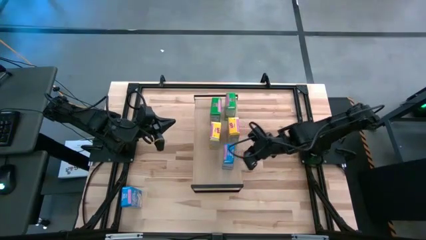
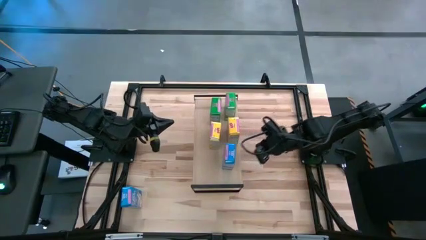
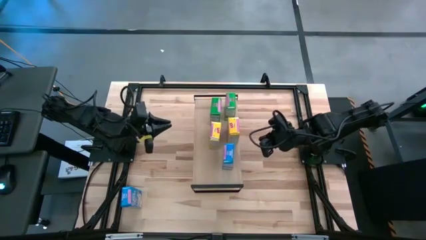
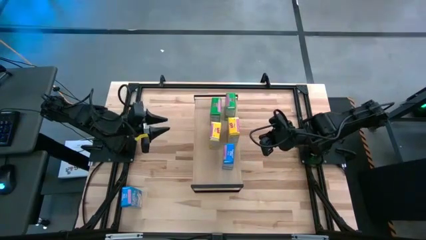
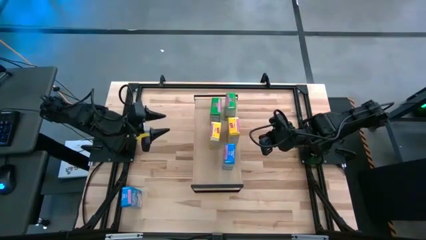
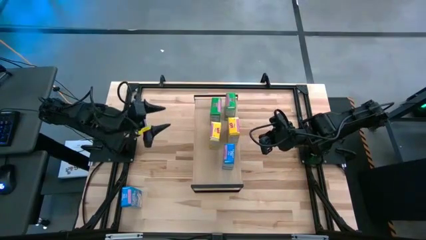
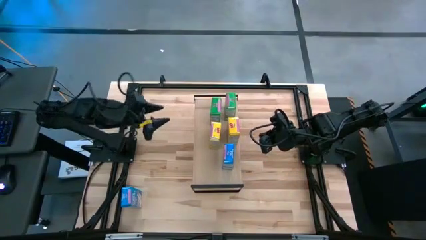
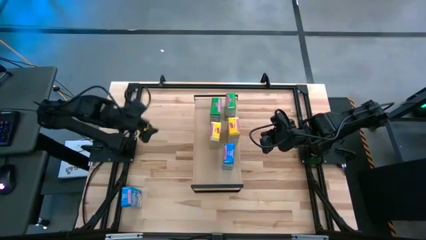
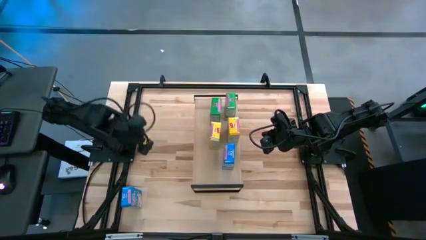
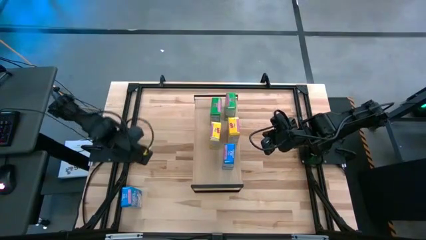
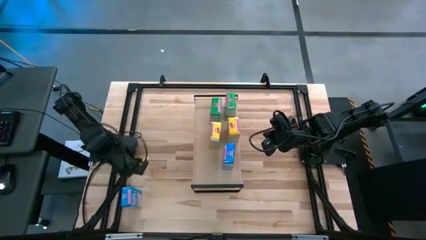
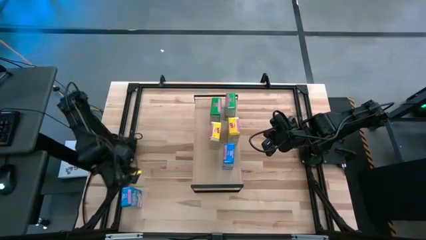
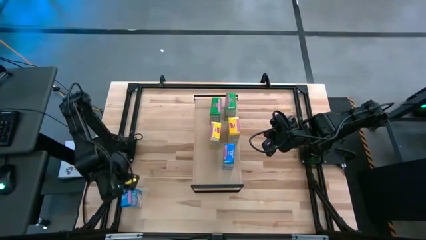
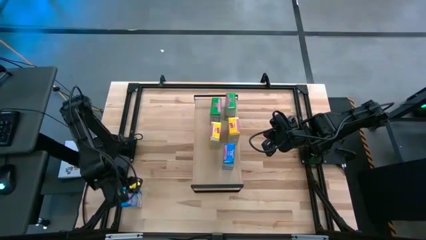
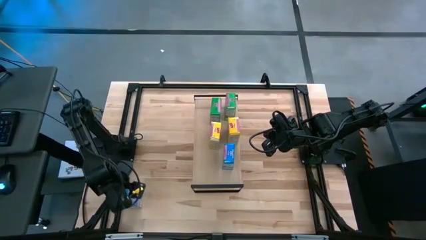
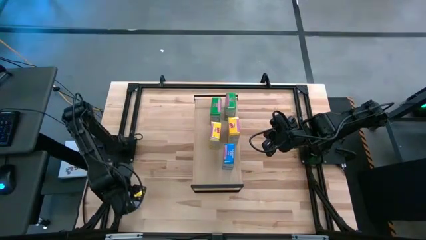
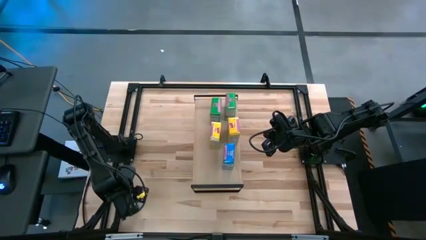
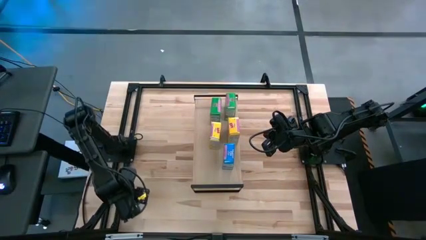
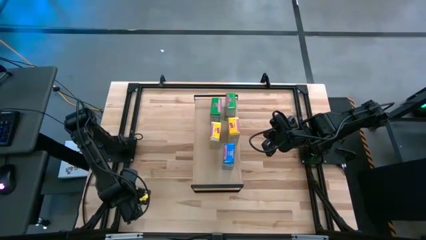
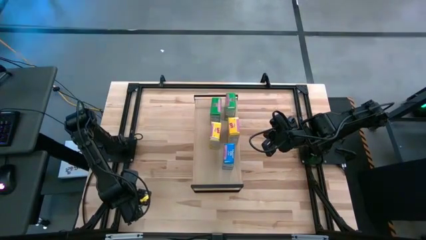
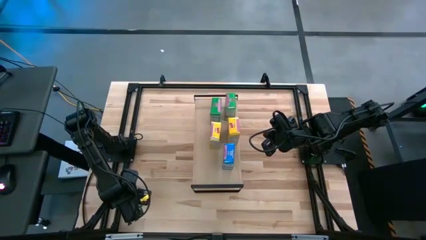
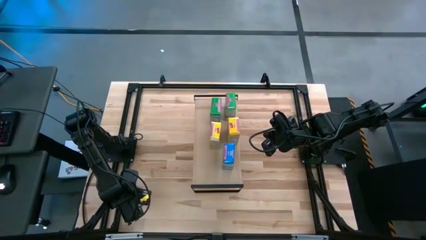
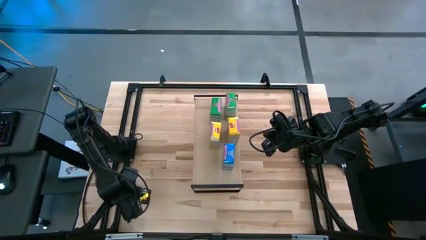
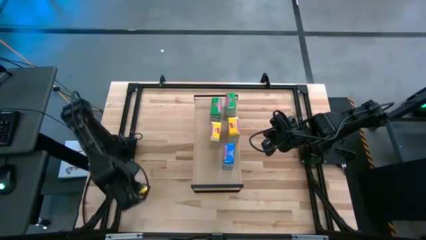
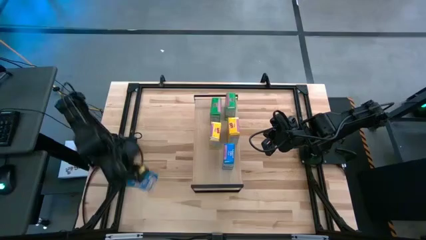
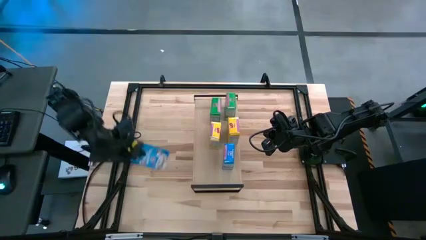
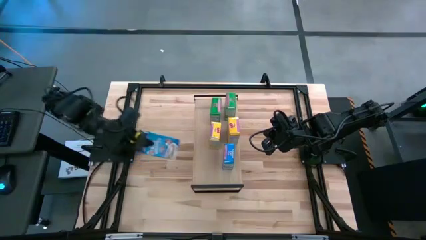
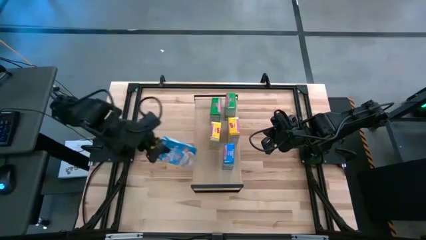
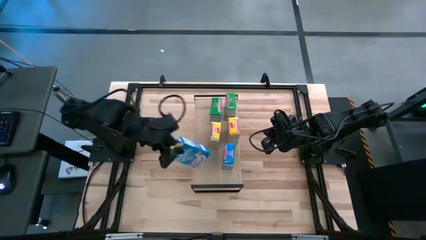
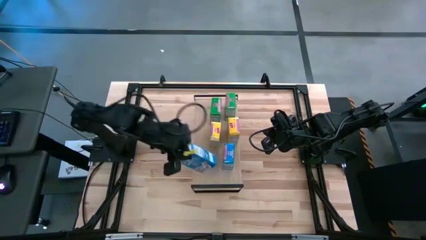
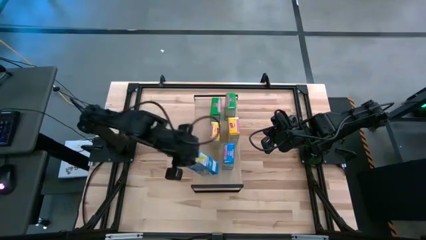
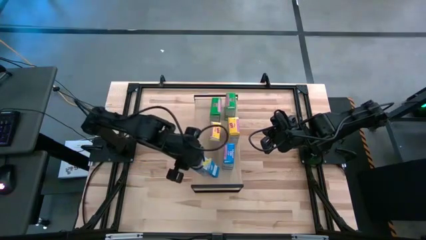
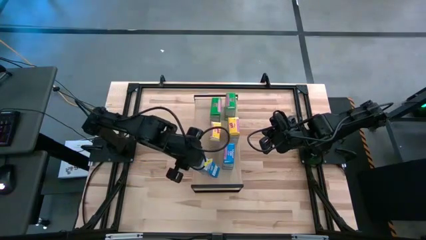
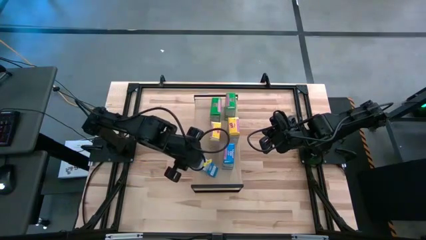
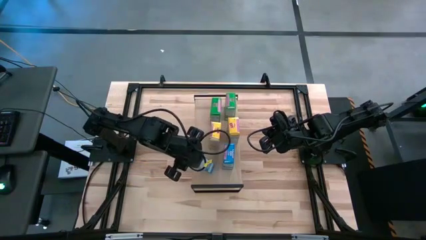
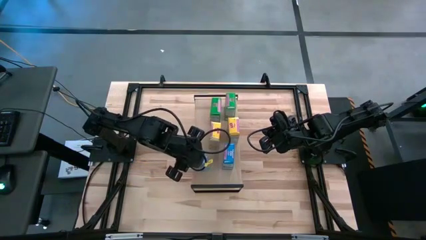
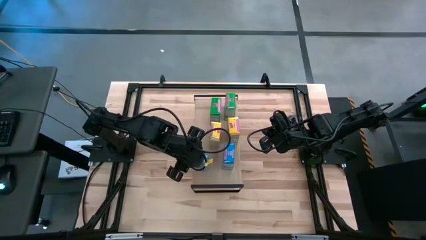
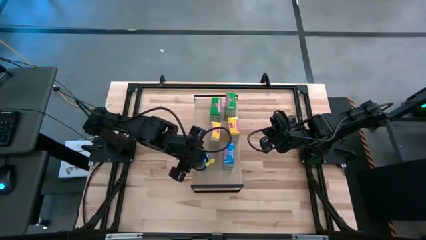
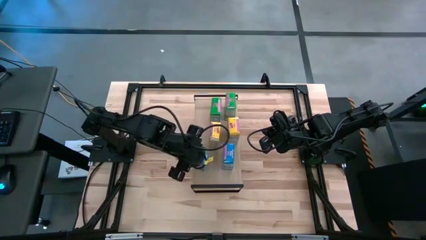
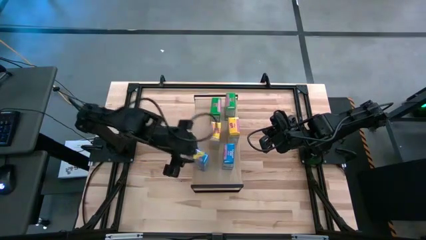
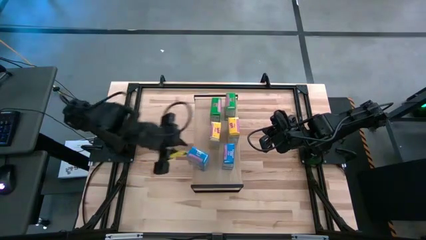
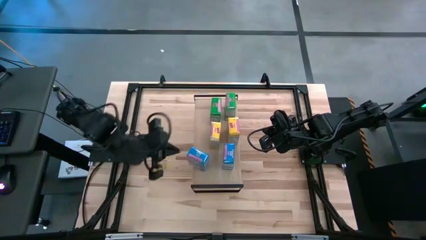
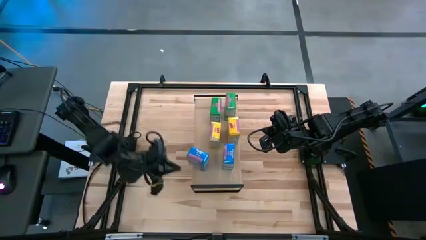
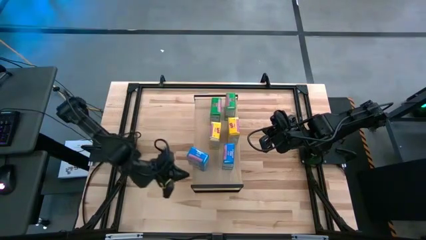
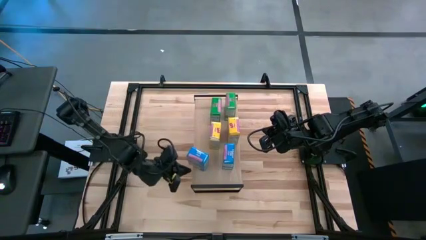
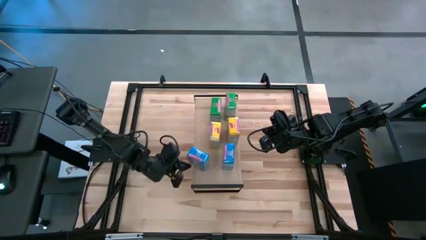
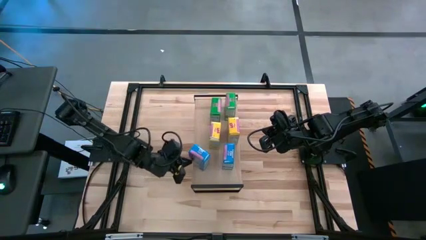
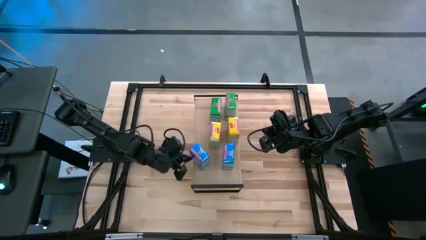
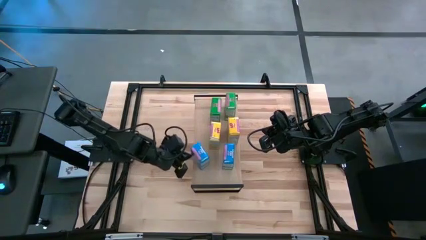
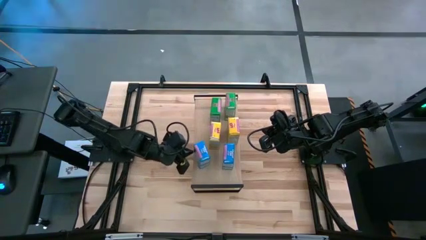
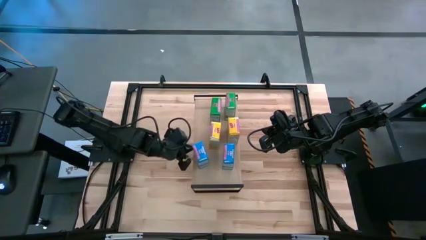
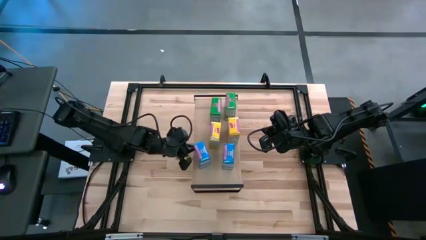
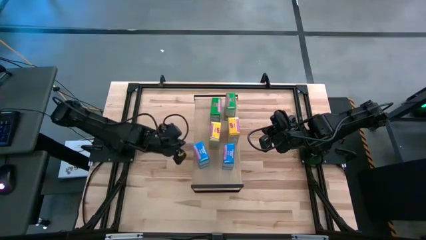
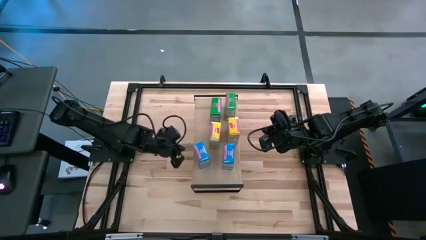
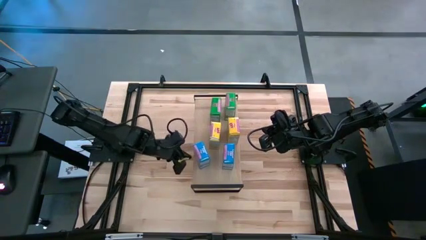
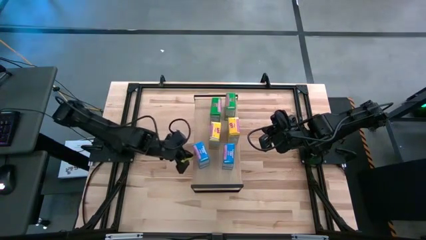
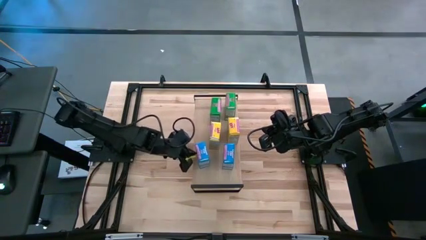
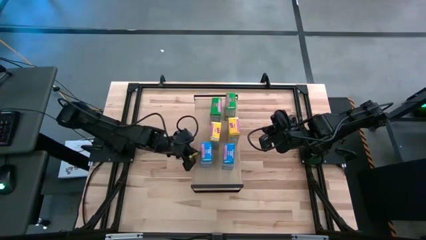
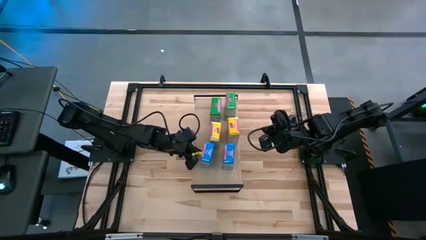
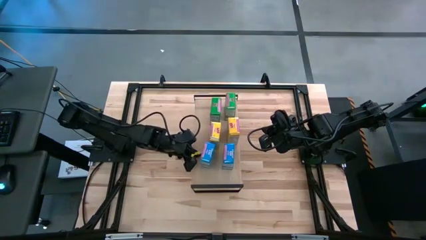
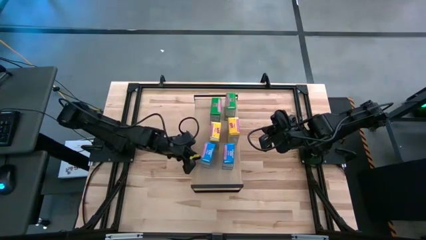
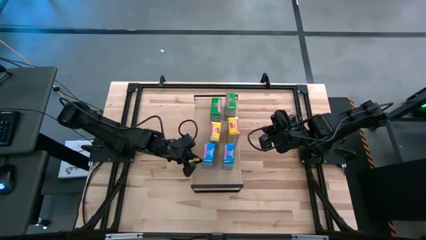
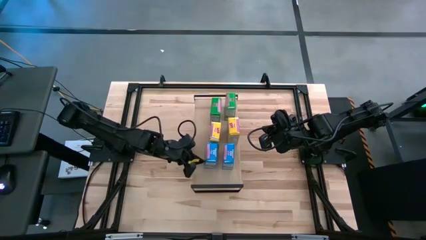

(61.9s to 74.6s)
Task: Stack cereal on shelf
Put the top blue cereal box on the shelf

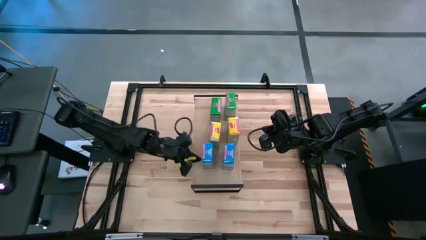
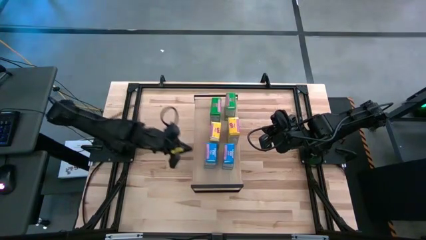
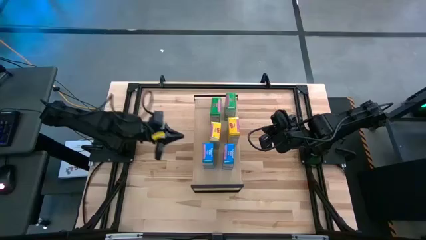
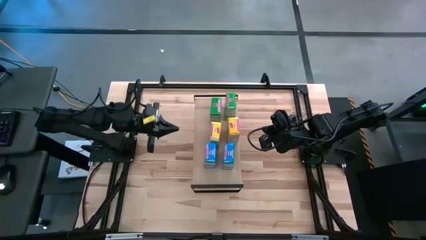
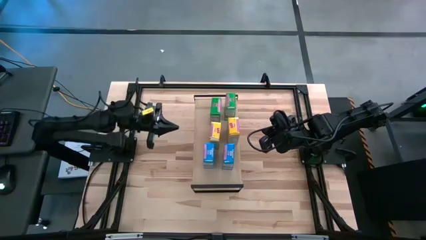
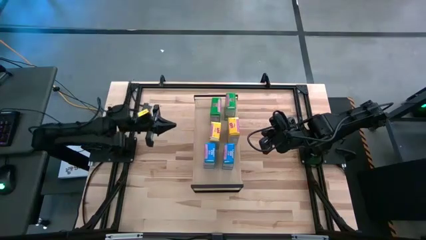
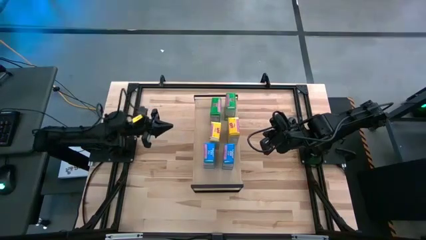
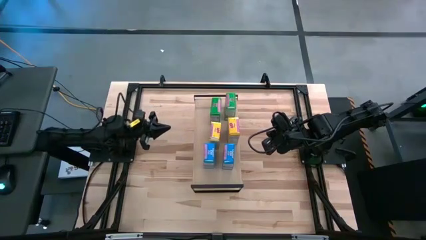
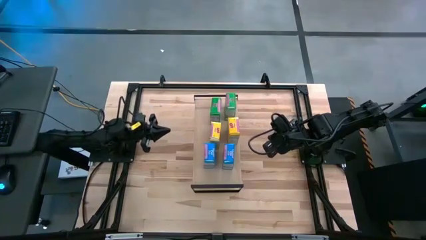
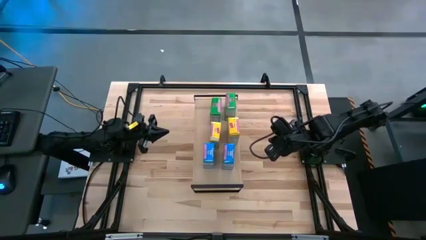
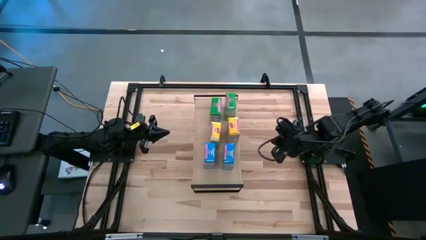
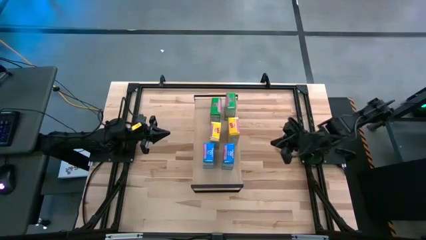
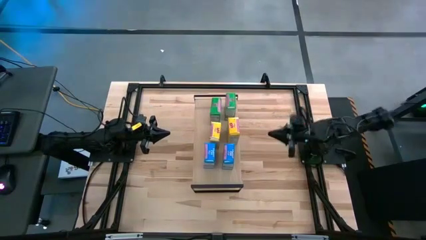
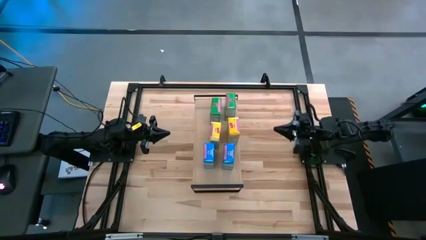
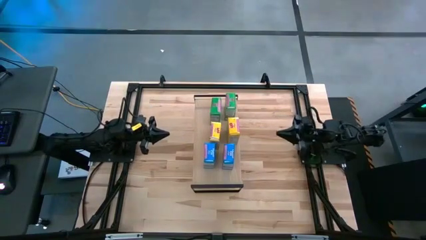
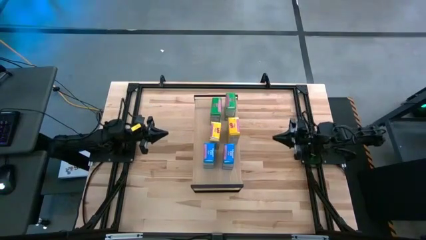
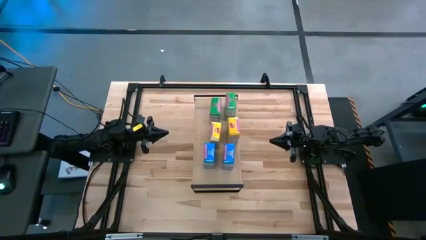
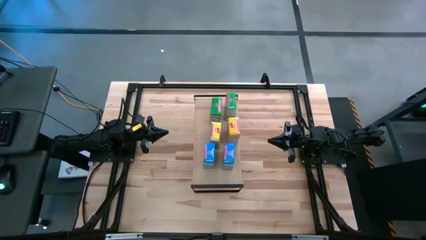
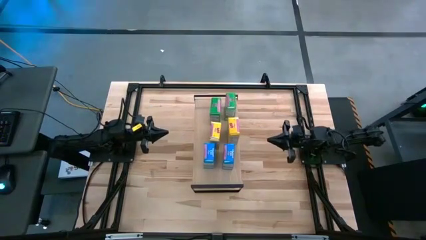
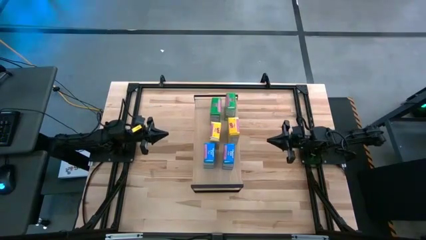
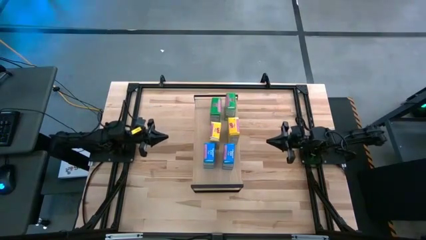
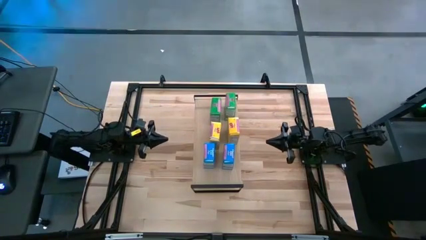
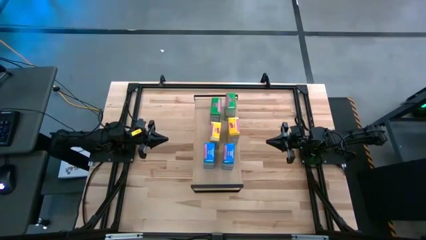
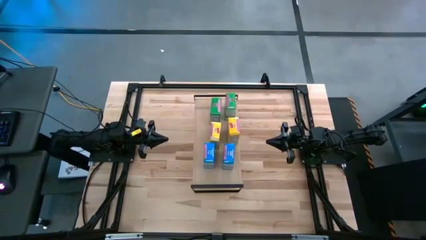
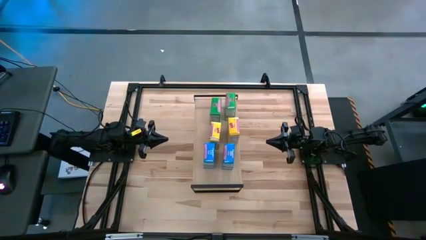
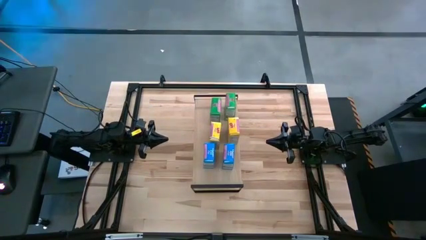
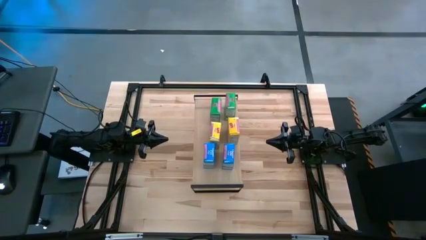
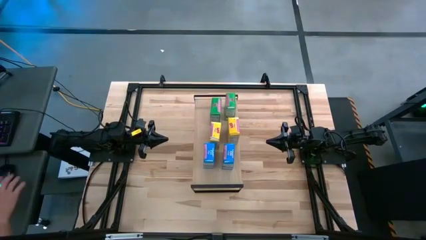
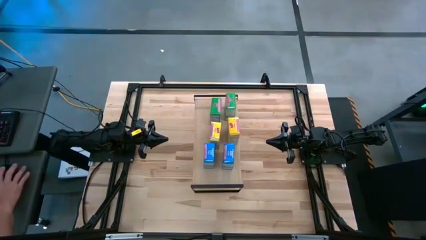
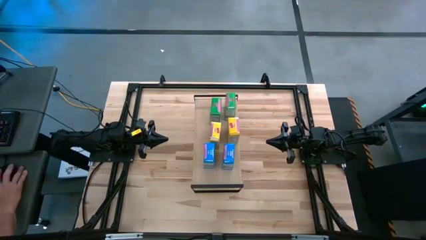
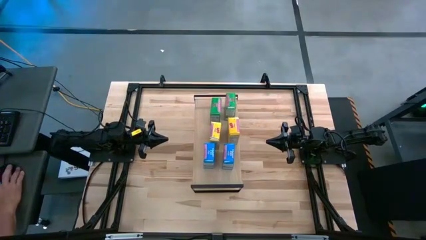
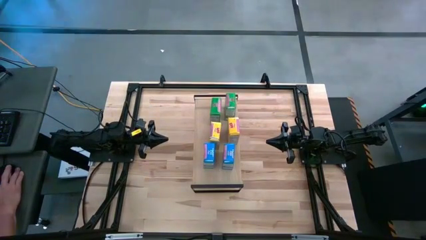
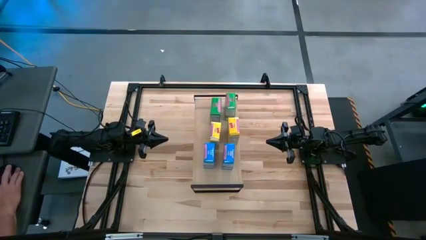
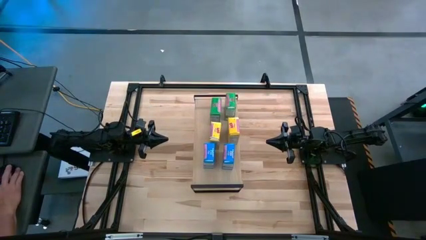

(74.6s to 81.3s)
Return to Home Position
